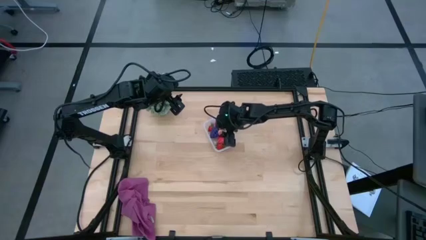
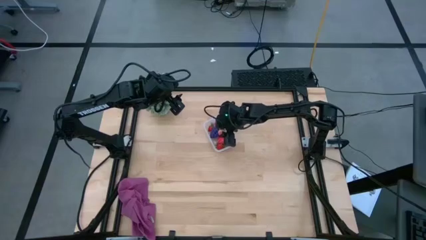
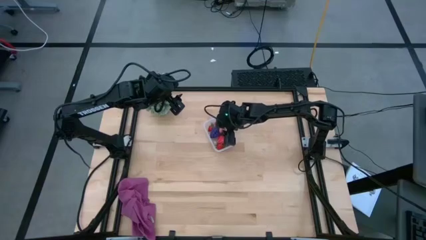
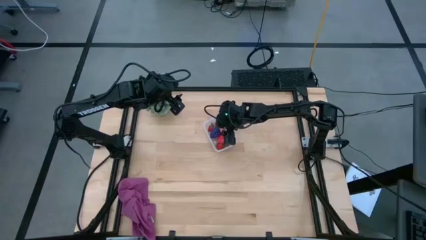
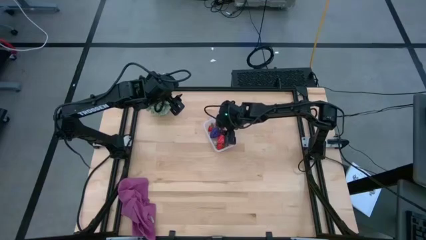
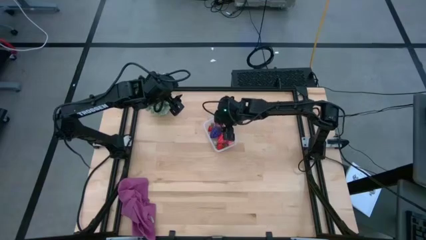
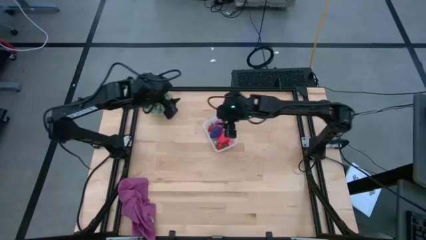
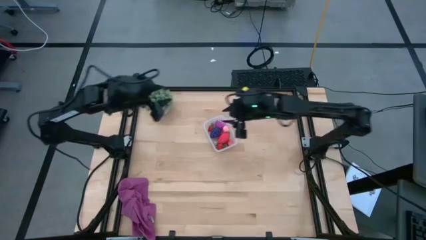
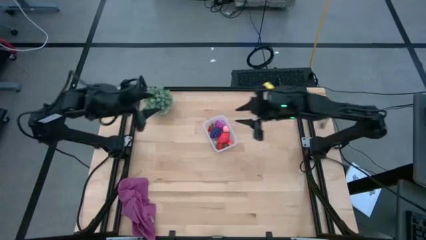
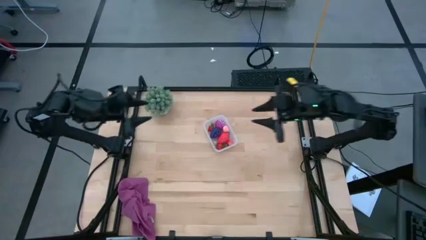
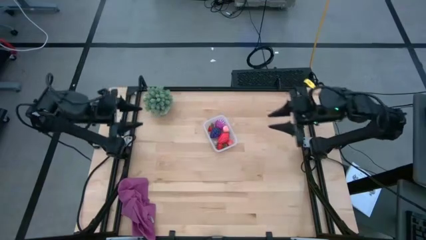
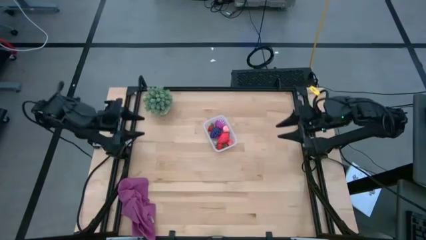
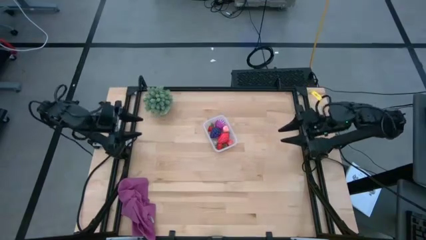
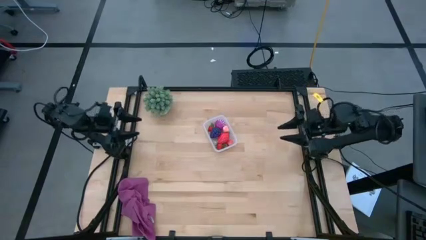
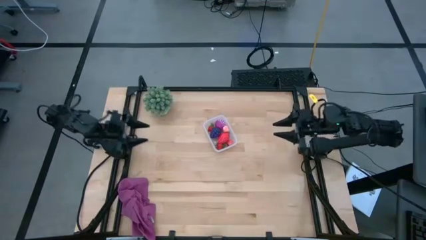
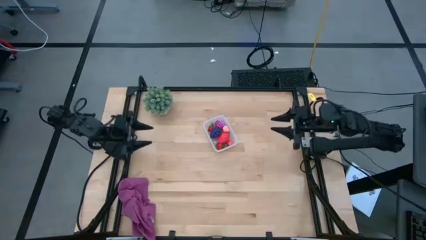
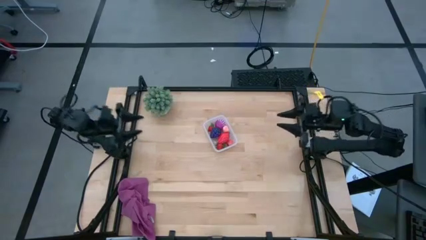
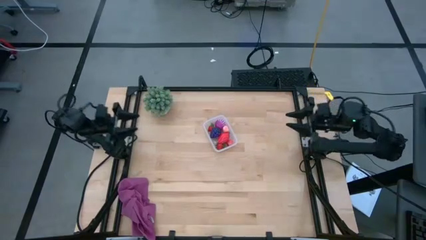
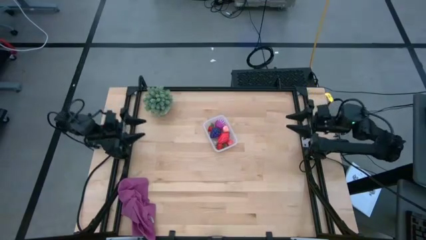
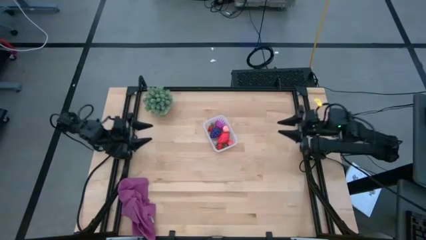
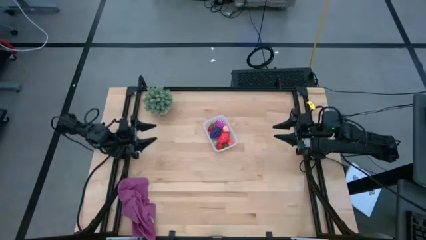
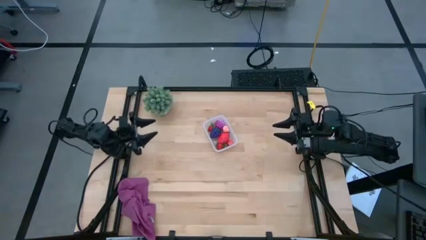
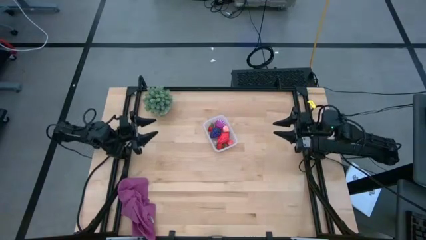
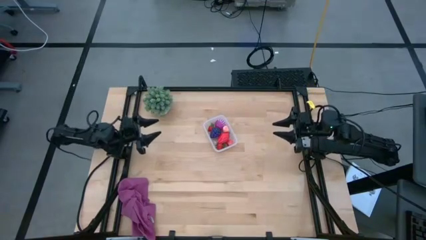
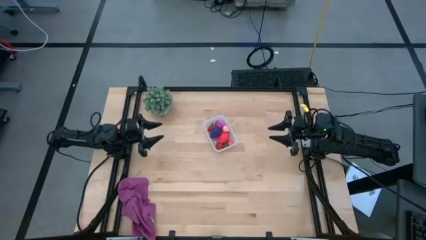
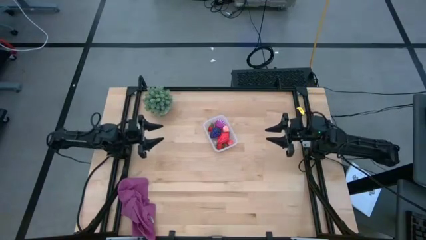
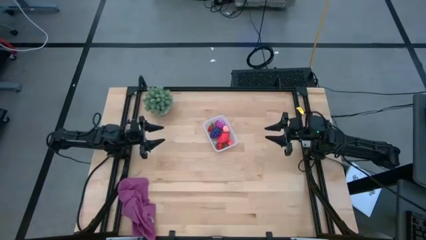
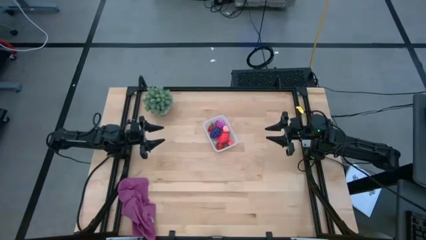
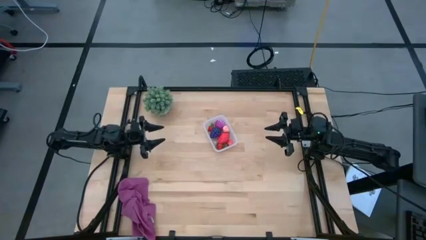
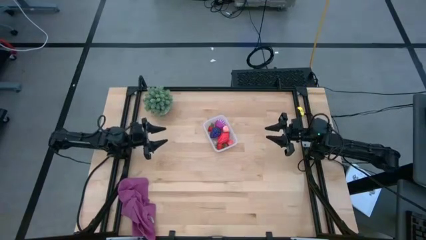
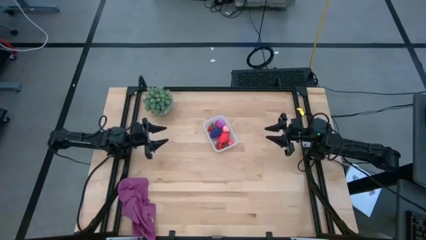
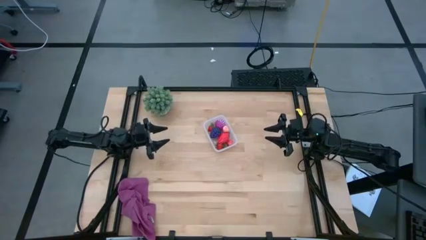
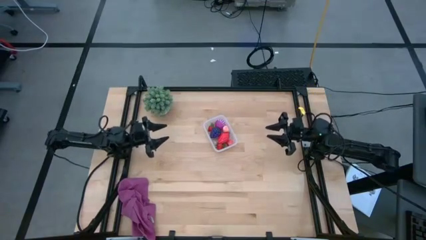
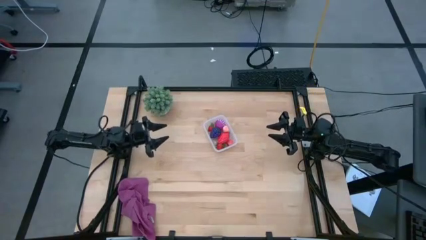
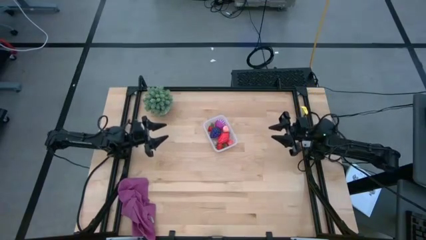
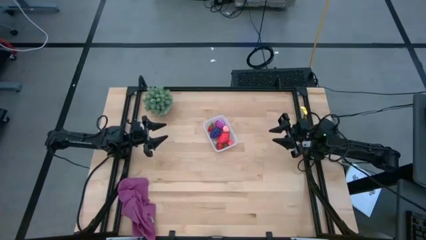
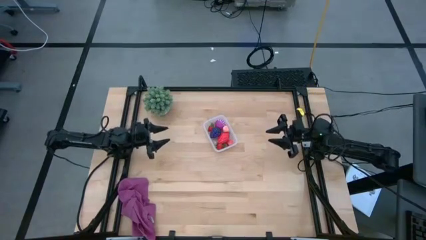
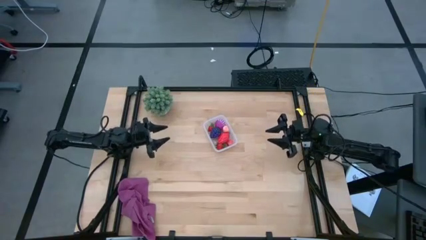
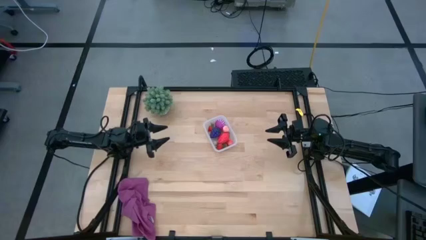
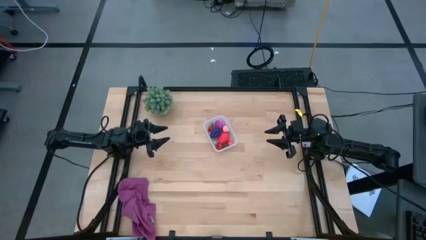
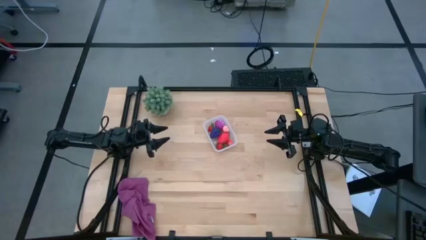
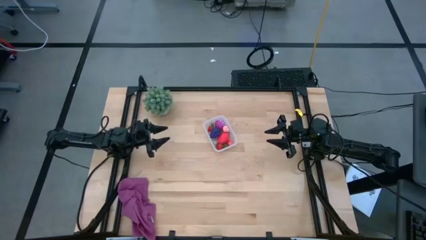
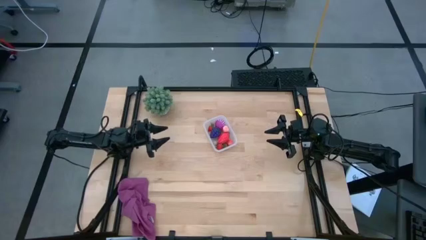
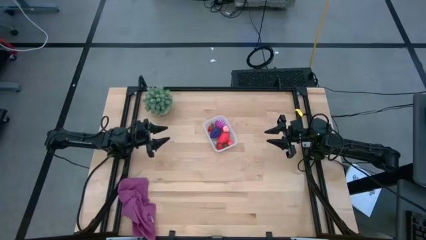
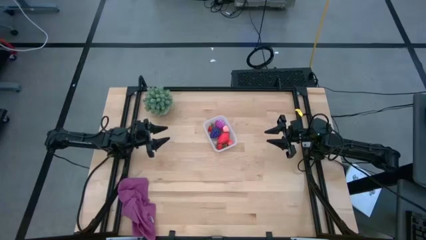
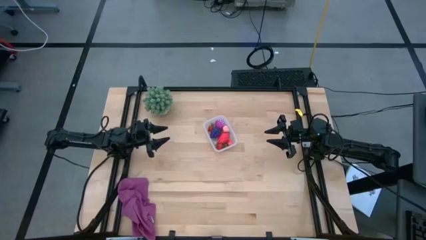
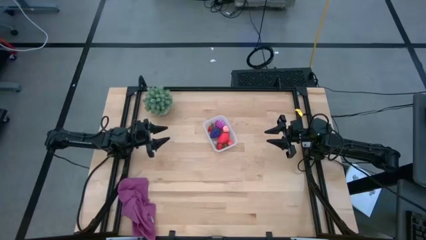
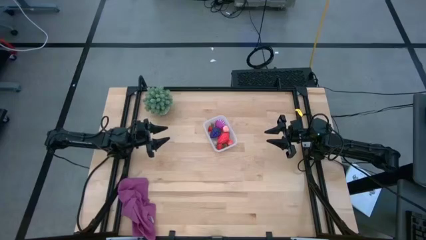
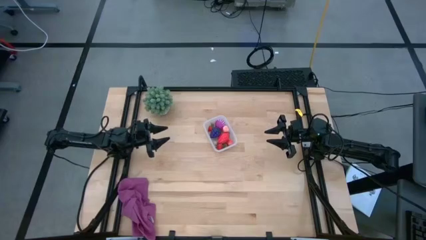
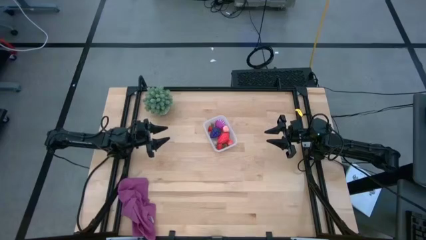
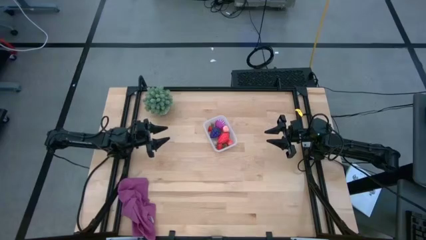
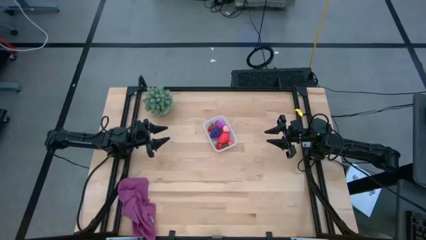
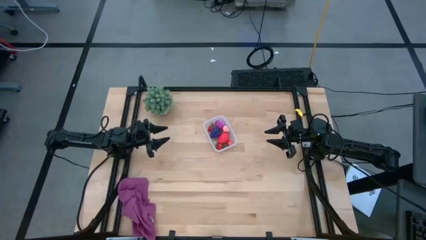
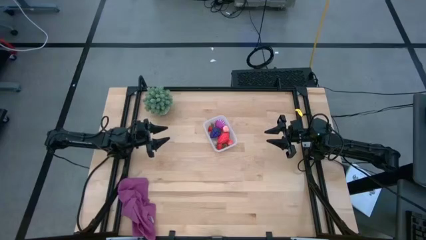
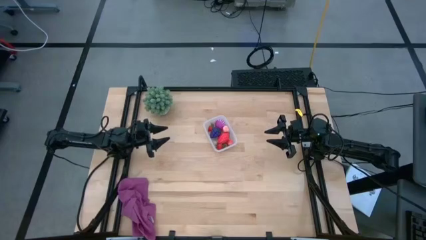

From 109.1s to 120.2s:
Task: Pick and placing Produce into tupperware
Return to Home Position

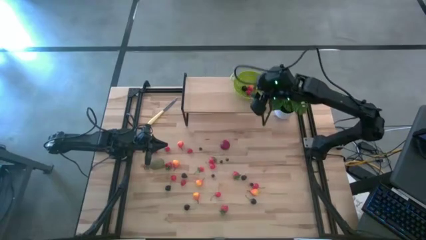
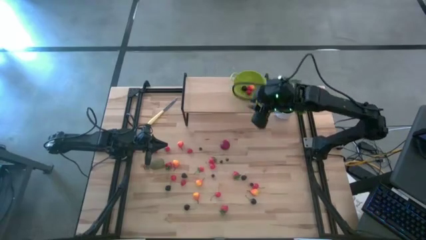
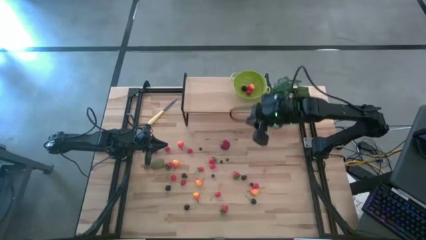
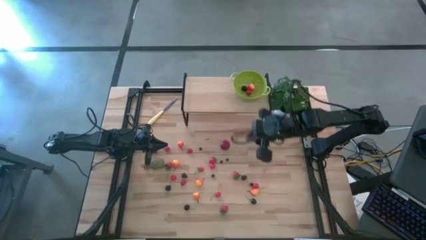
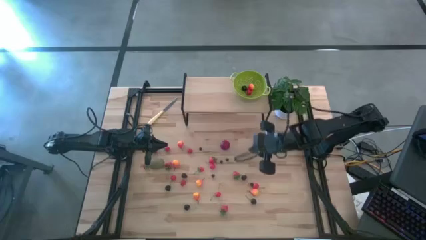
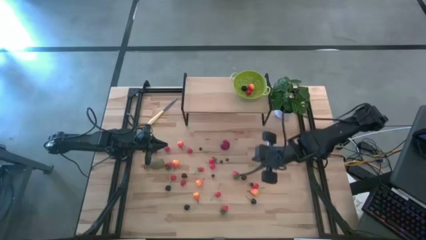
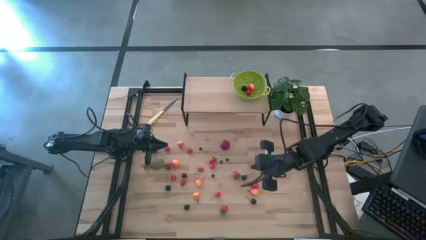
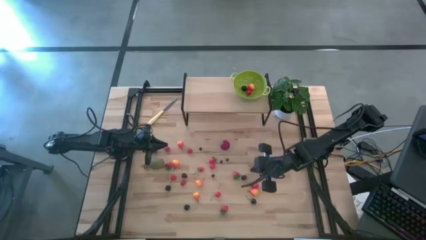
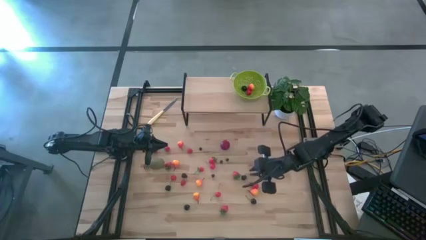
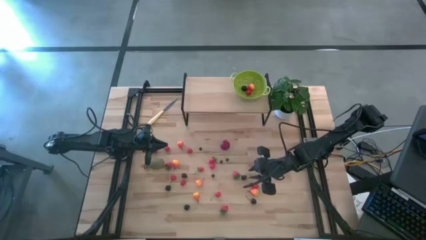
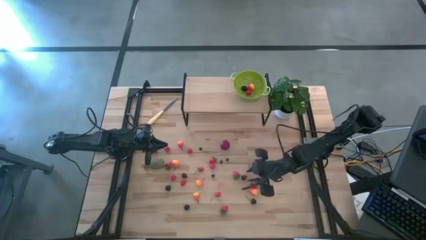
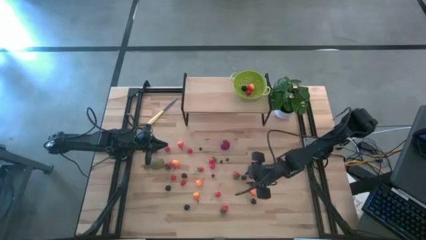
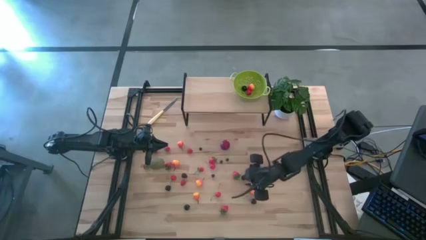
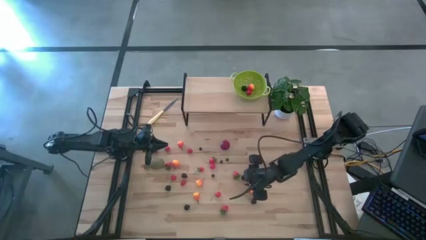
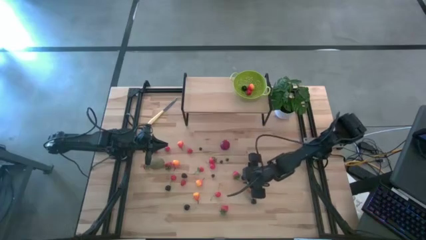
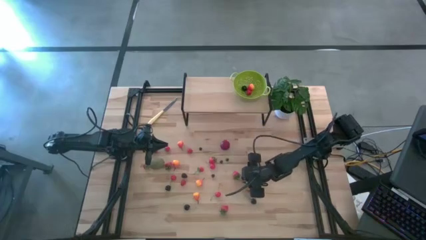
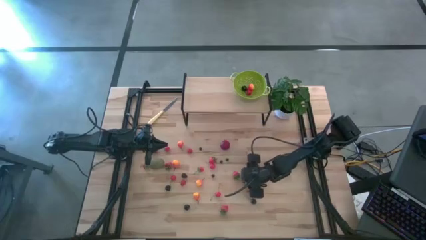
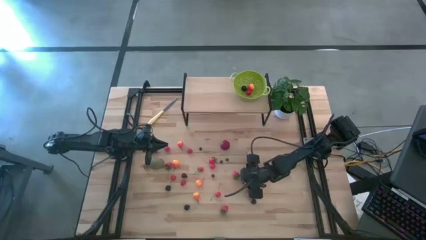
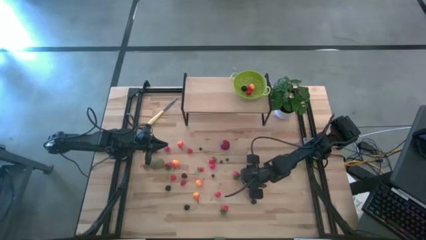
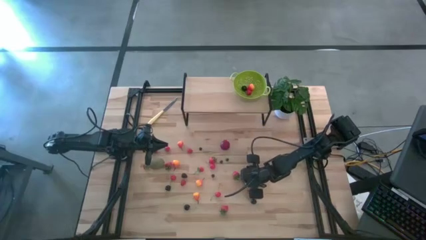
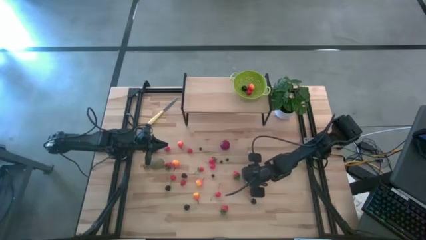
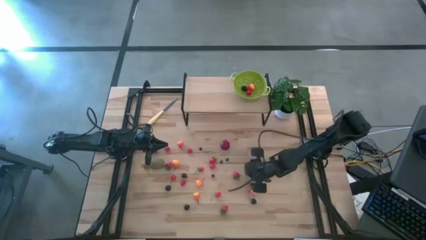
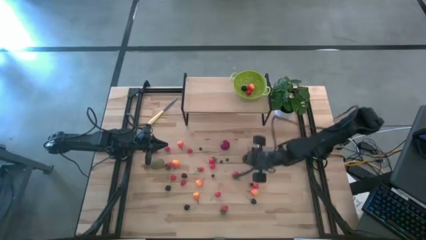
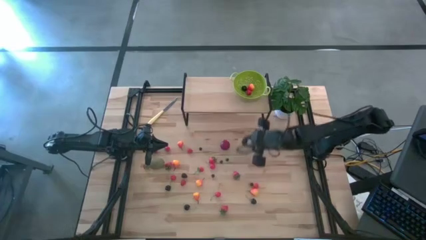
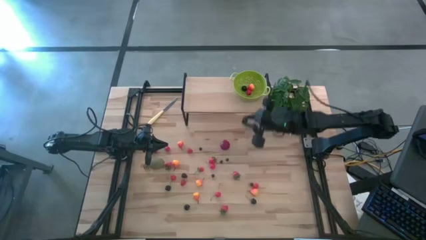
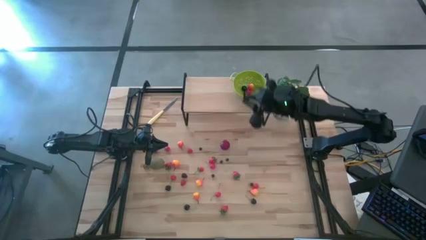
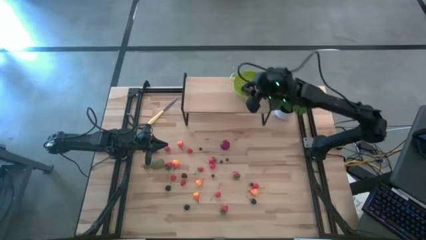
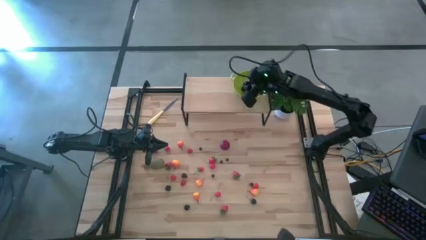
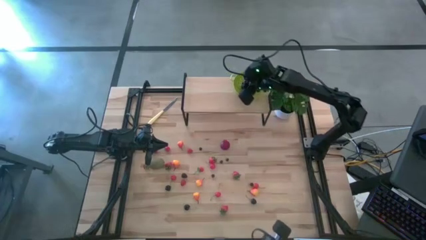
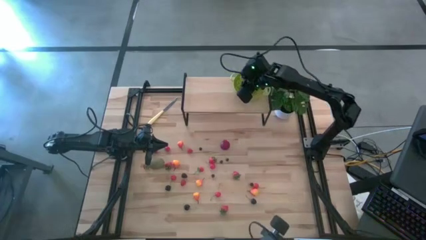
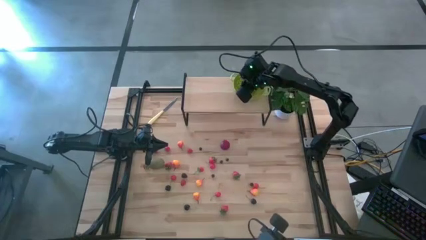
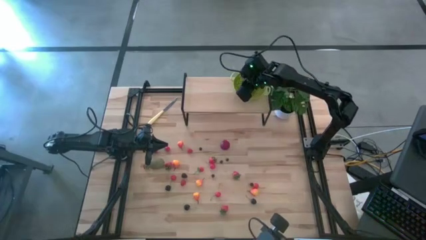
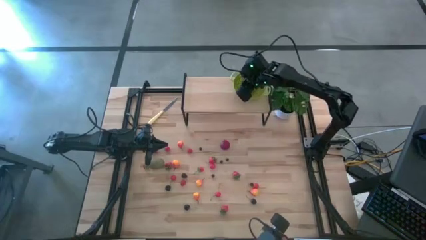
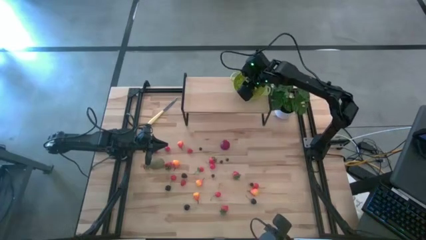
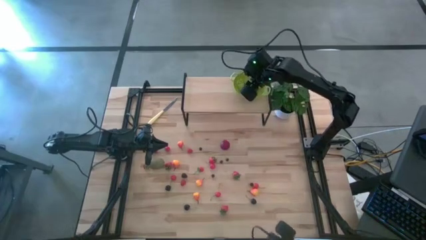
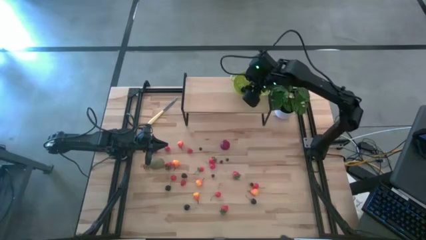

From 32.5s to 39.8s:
Task: Build produce basket
Put the blackberry into the green basket
